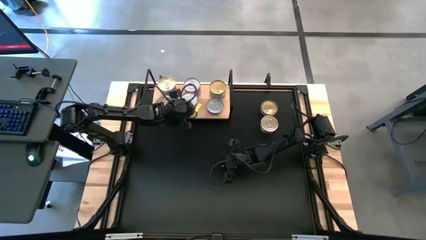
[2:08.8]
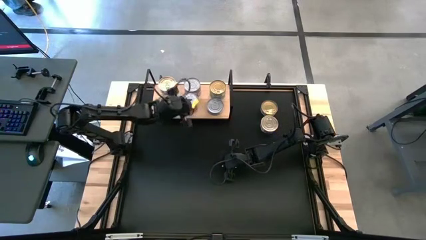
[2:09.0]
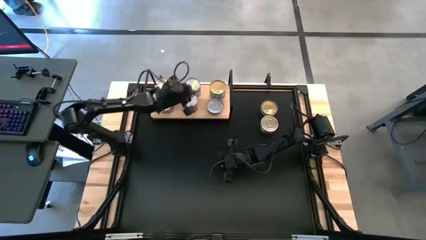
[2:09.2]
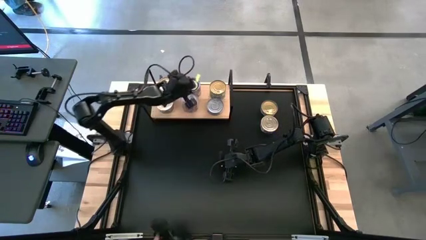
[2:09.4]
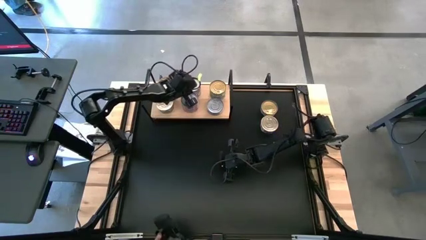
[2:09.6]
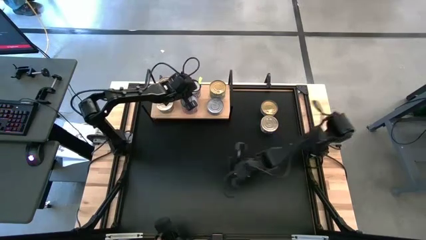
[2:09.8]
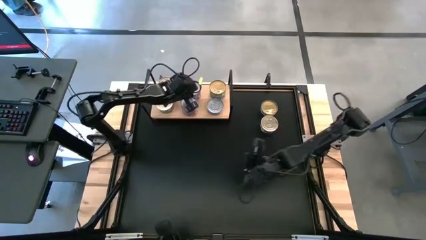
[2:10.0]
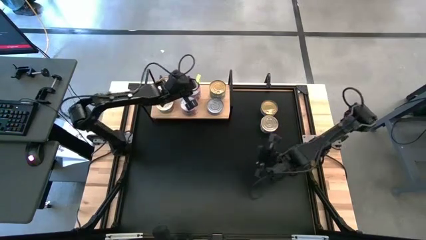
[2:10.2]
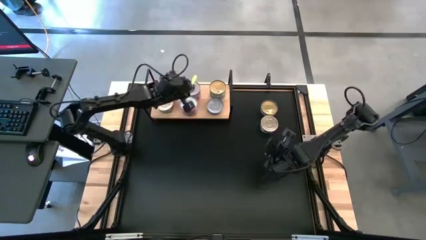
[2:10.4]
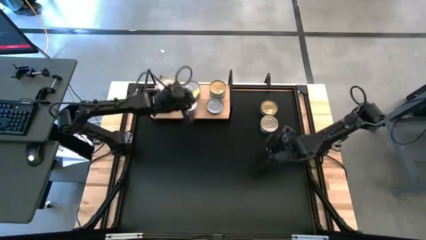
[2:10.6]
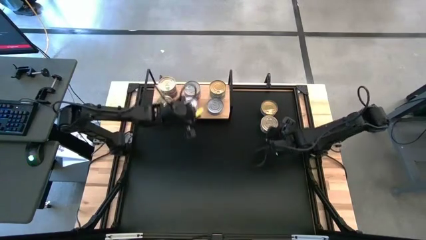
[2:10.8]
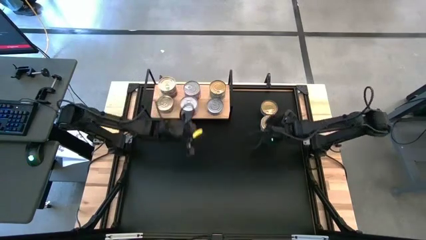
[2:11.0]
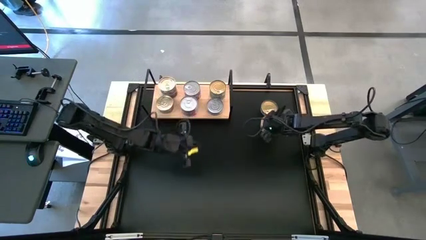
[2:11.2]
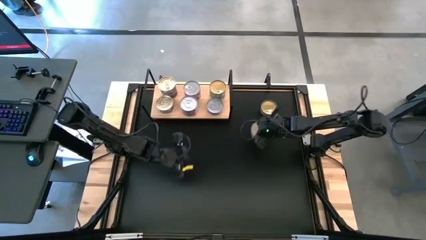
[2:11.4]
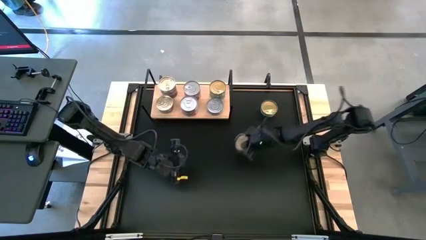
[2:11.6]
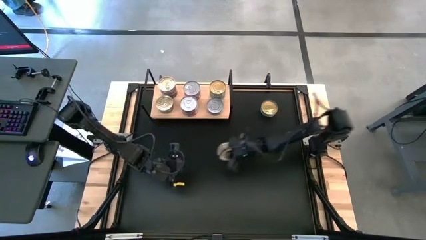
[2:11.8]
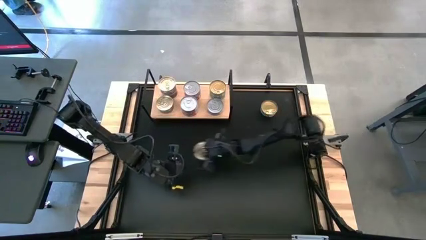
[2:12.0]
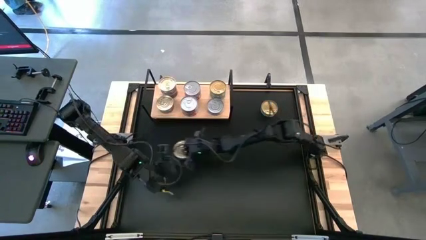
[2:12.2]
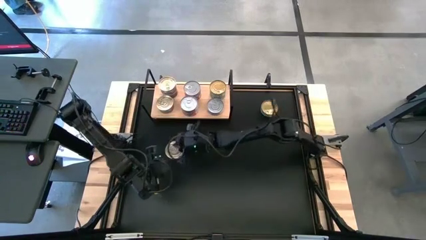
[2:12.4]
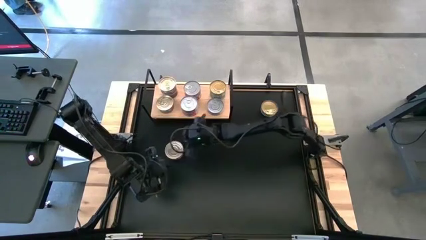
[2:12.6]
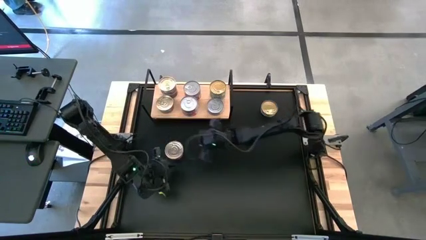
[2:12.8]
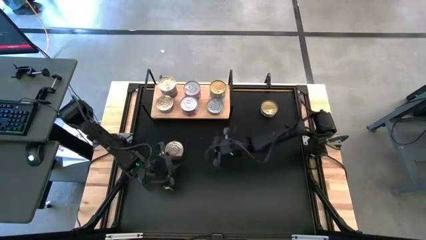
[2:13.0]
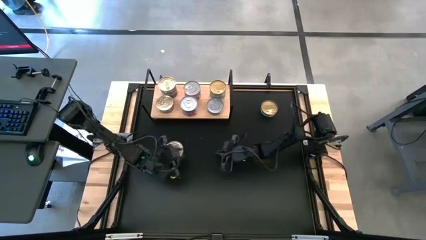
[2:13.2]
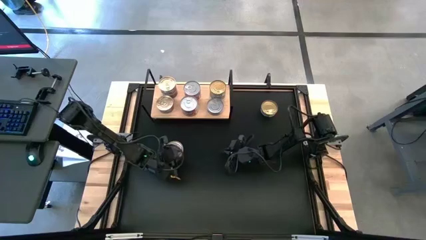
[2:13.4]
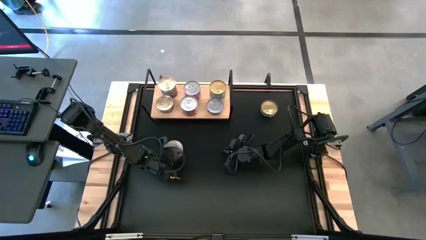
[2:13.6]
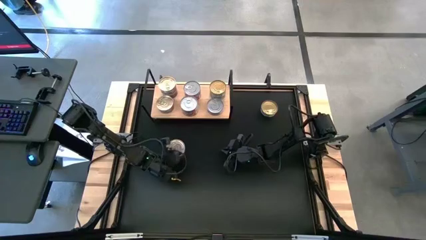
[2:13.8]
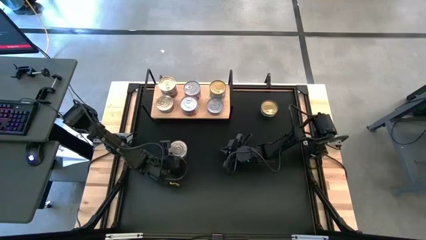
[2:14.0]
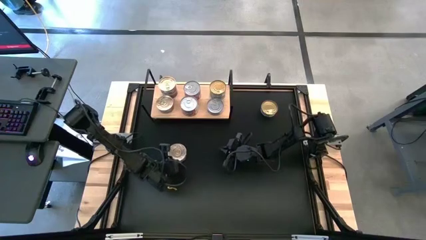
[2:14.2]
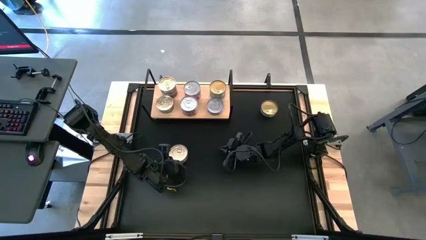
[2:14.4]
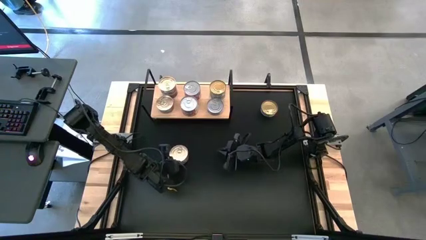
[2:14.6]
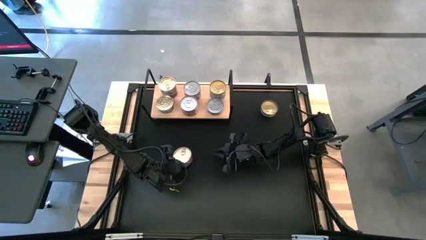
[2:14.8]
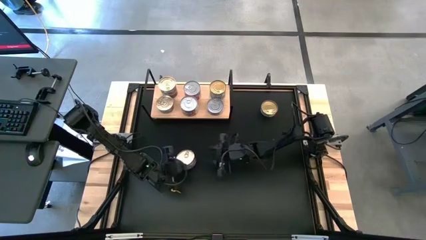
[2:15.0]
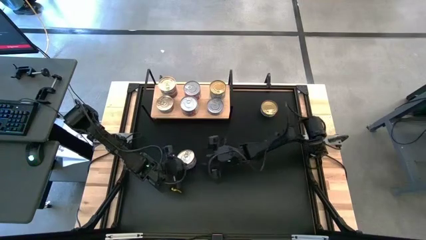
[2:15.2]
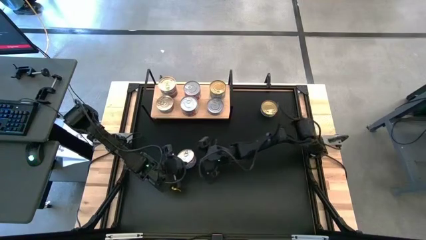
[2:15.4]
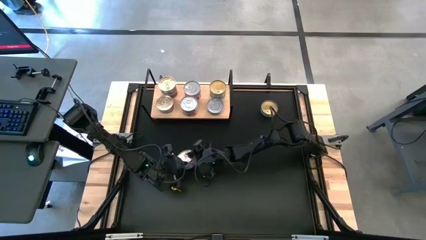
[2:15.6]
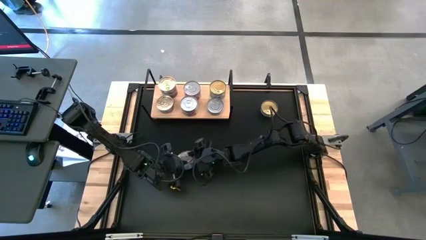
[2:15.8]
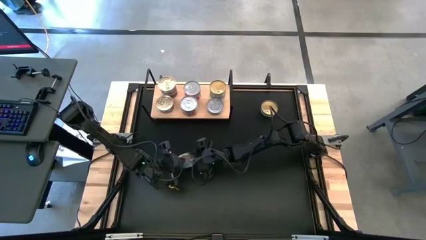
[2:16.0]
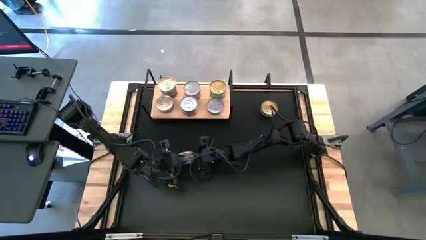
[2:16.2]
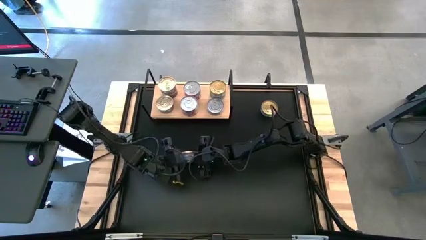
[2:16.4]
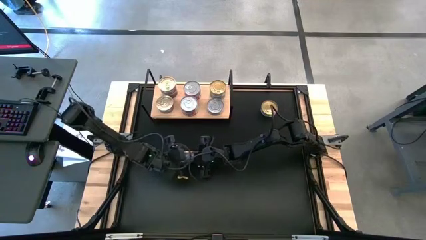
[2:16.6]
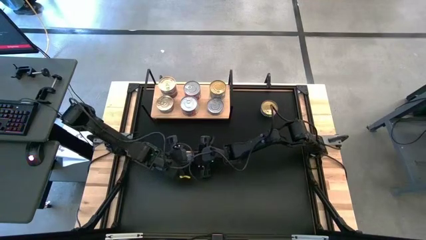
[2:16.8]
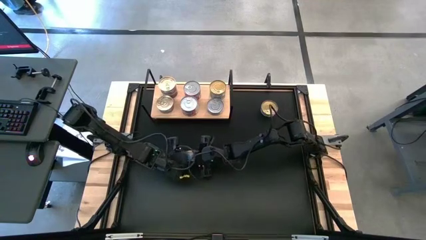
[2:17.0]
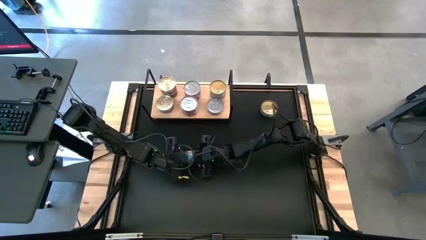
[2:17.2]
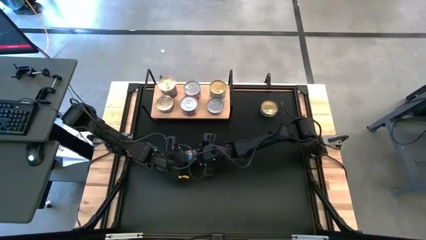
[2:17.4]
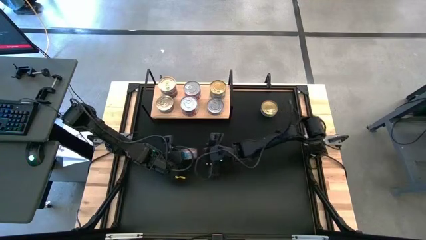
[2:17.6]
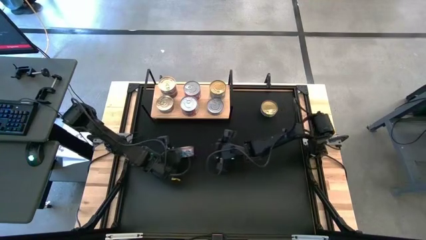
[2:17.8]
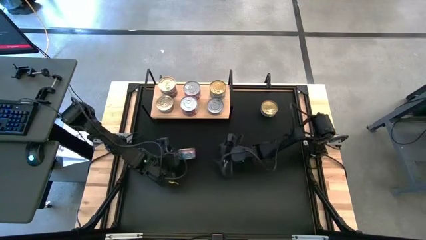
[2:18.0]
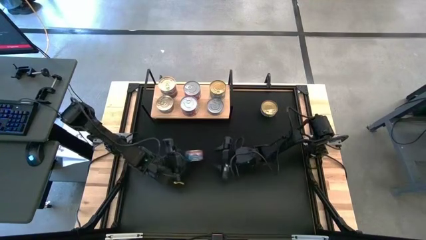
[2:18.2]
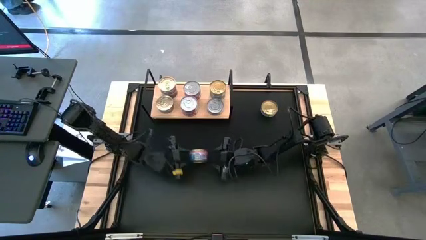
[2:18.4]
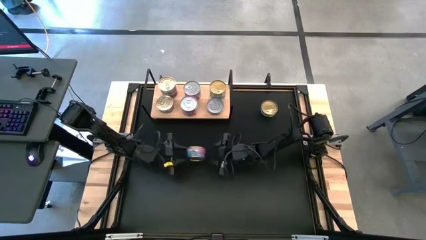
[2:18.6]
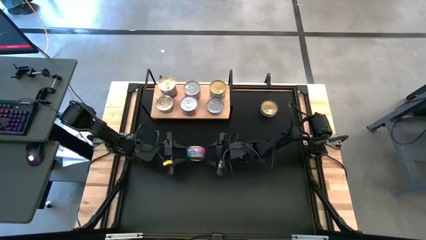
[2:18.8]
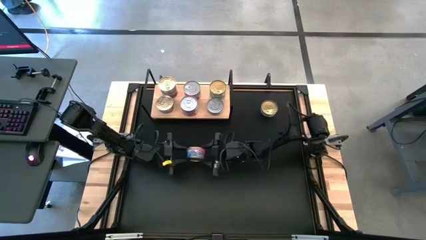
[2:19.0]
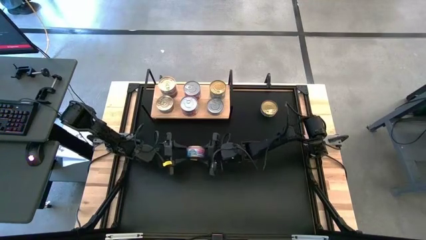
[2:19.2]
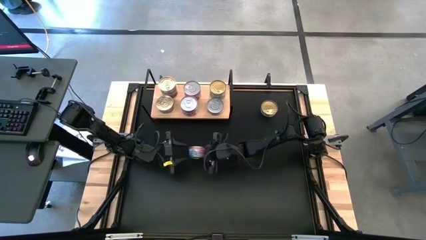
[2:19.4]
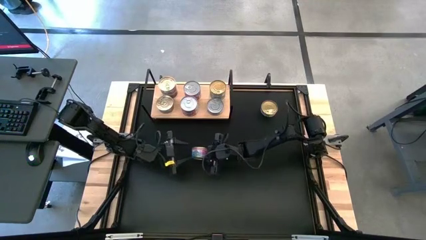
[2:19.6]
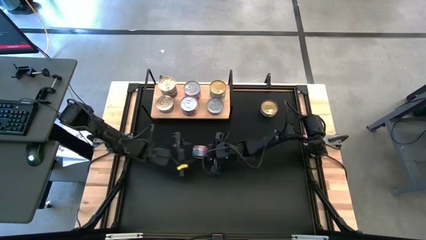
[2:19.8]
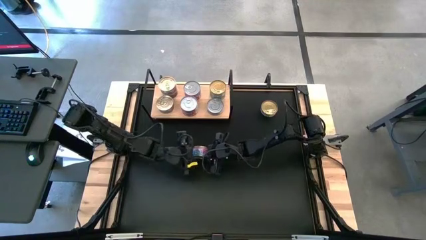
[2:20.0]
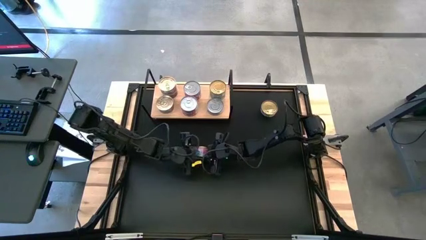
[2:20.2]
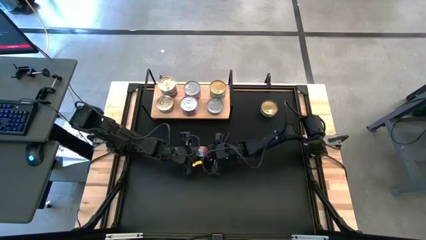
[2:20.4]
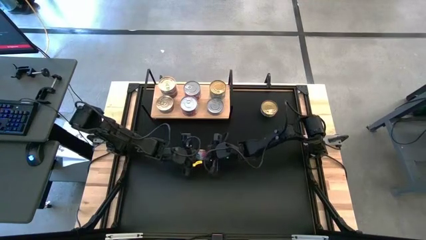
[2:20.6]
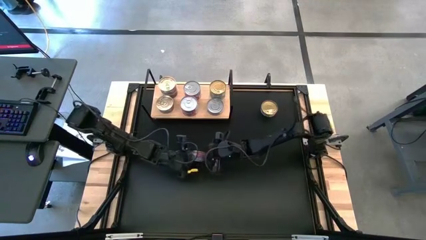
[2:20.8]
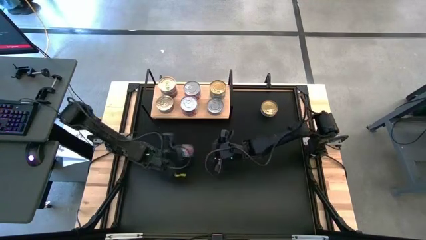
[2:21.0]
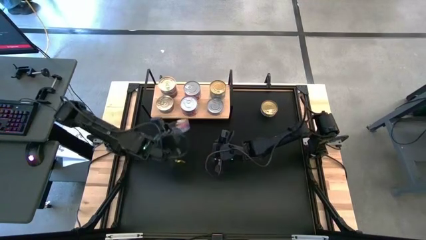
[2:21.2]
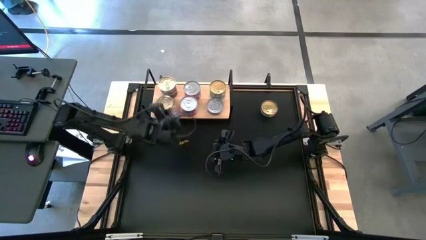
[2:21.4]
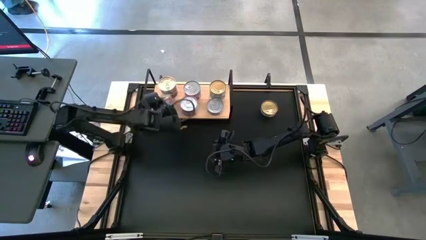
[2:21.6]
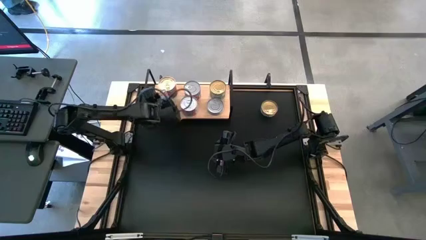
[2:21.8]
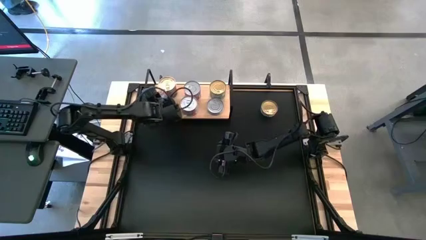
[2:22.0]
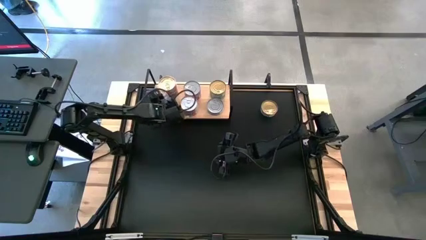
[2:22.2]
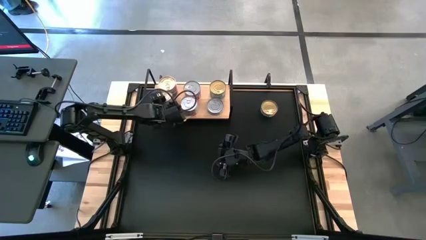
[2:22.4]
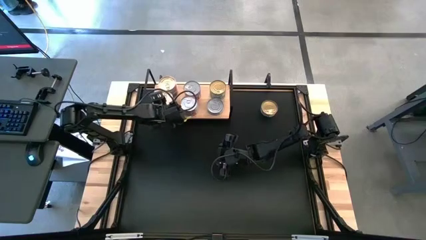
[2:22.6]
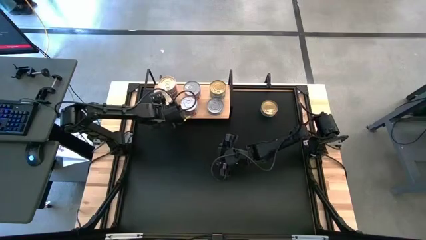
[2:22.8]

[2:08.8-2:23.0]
Task: Stack canned seafood by type on shelf
Stack the blue tuna can on top of the blue tuna can on the shelf

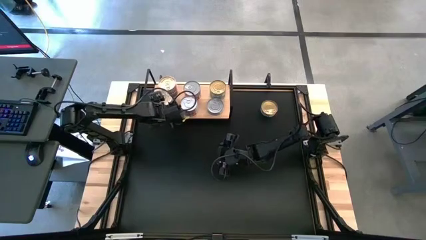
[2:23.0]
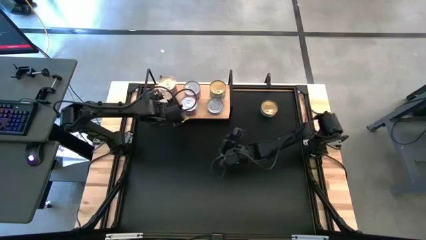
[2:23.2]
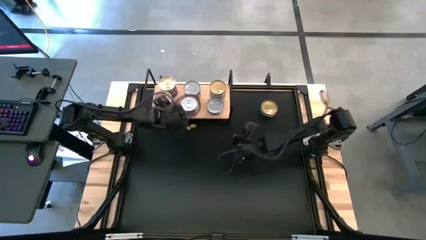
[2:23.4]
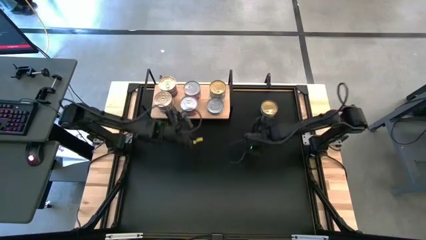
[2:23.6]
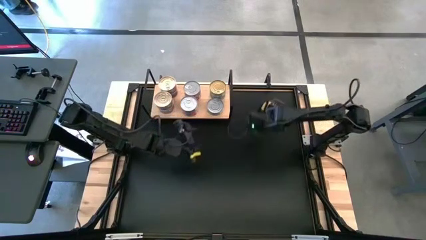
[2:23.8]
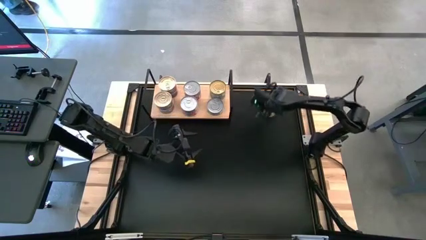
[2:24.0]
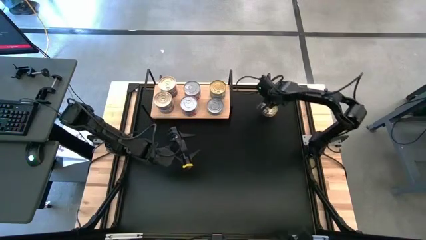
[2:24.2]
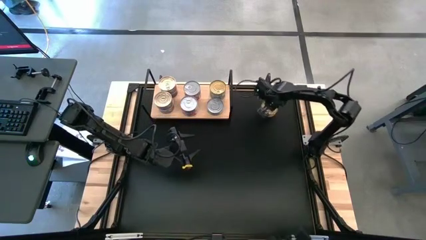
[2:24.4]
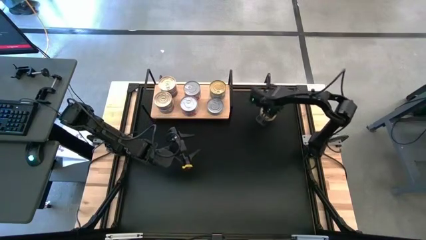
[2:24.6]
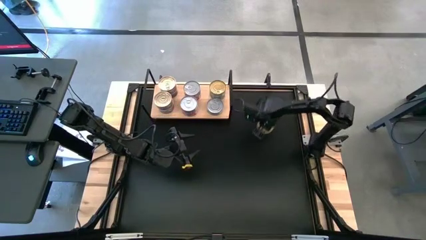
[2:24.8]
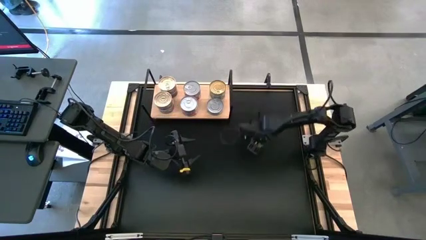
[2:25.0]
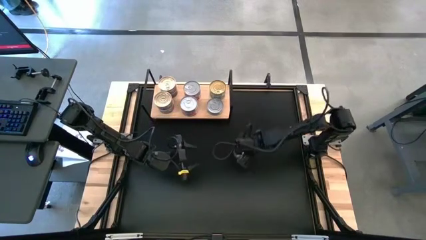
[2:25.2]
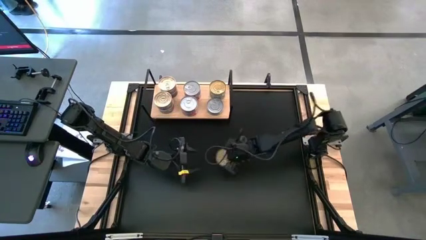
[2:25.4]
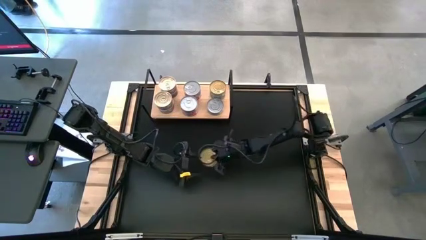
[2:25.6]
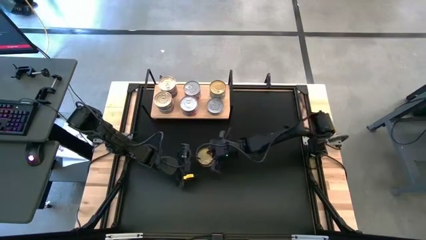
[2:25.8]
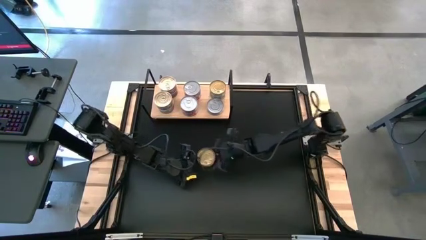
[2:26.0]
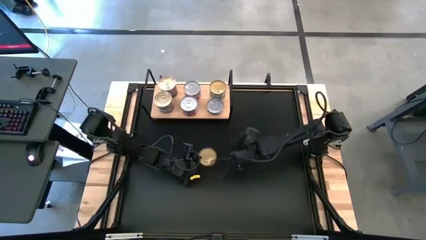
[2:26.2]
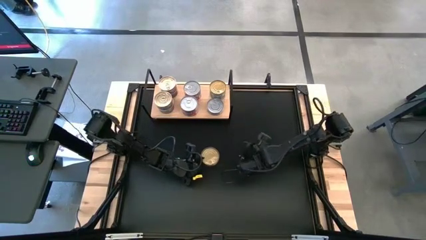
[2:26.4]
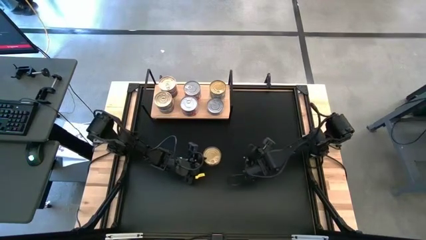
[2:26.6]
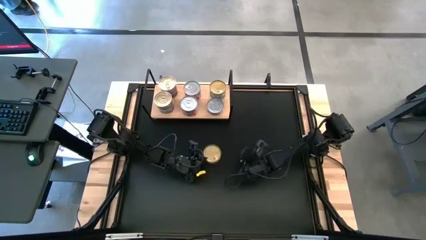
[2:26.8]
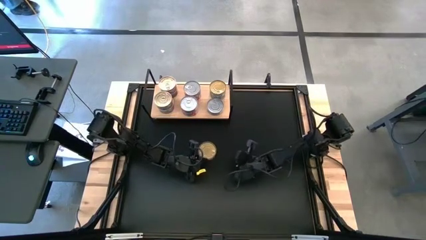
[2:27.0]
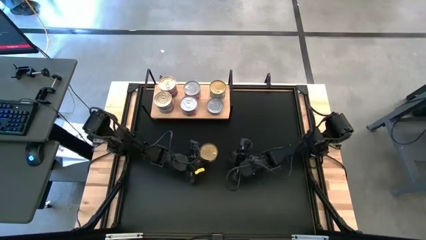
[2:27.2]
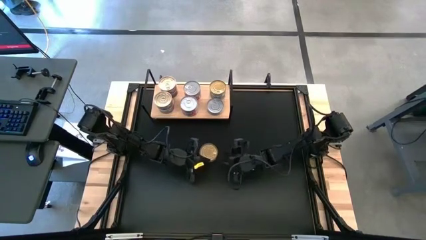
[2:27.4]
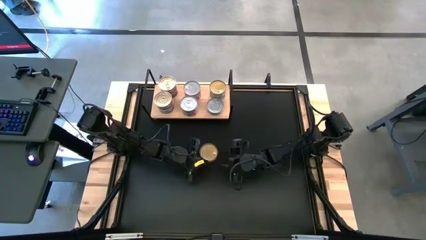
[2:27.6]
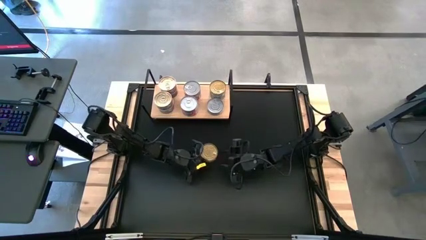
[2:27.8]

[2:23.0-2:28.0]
Stack the green tuna can on top of the green tuna can on the shelf
